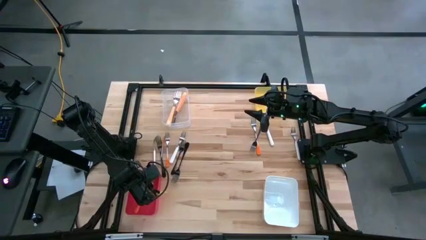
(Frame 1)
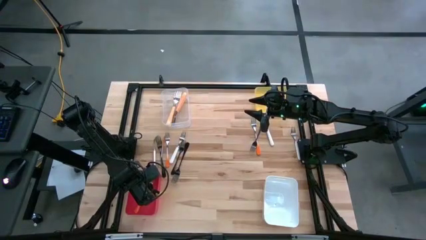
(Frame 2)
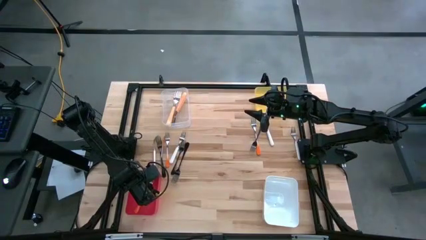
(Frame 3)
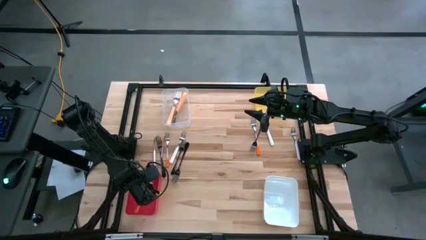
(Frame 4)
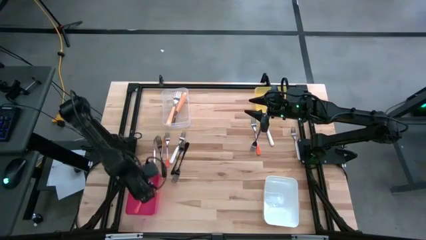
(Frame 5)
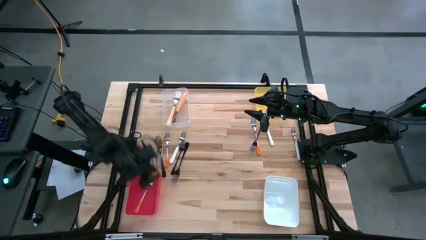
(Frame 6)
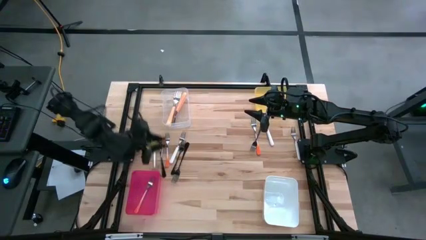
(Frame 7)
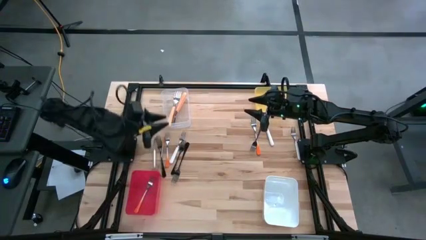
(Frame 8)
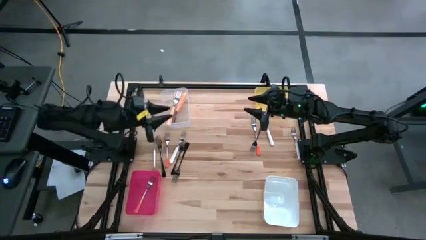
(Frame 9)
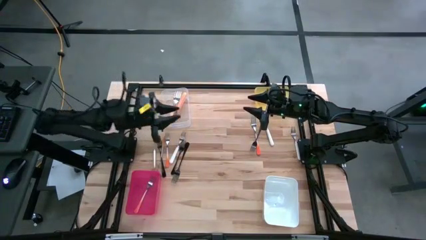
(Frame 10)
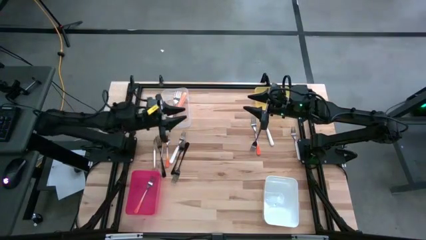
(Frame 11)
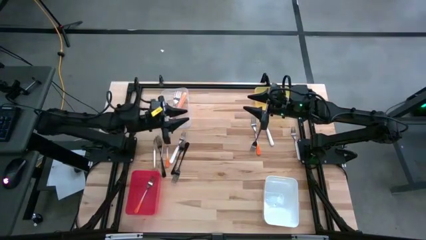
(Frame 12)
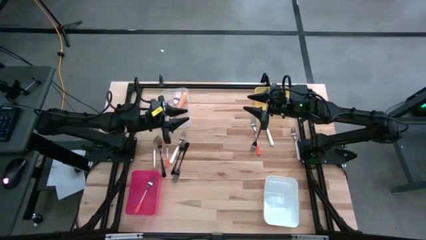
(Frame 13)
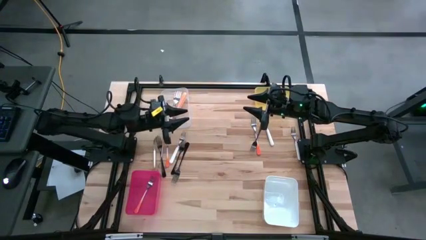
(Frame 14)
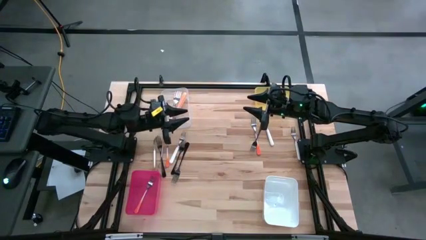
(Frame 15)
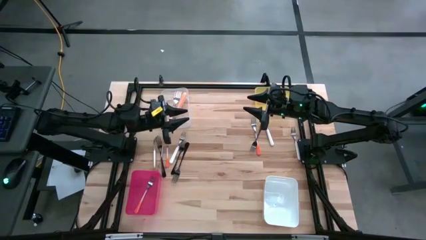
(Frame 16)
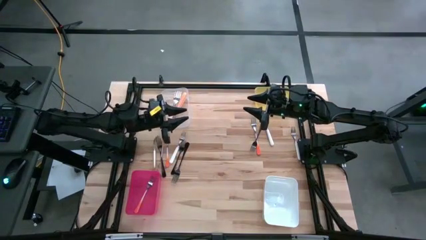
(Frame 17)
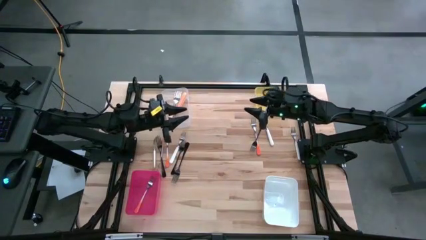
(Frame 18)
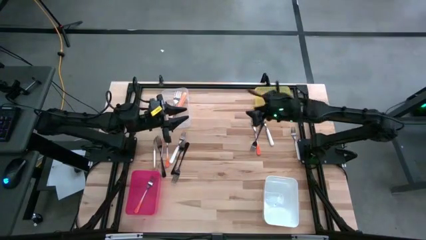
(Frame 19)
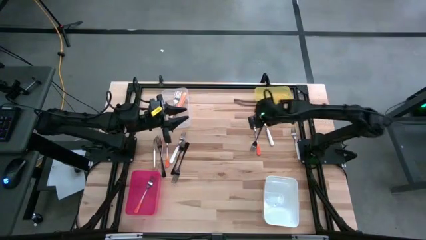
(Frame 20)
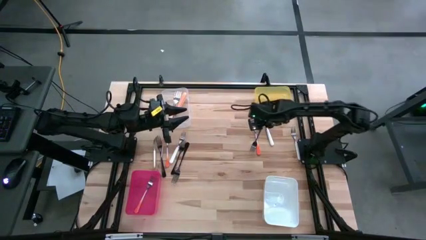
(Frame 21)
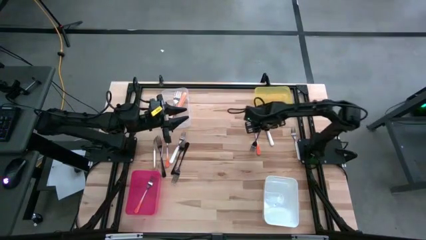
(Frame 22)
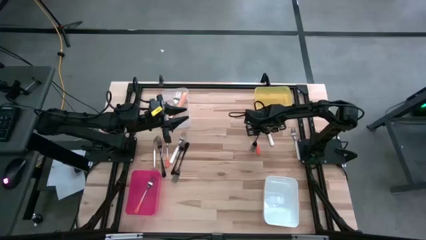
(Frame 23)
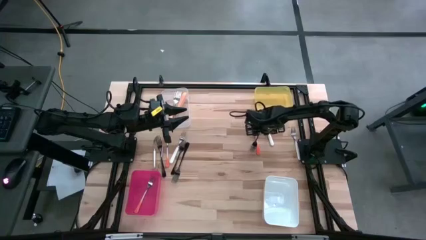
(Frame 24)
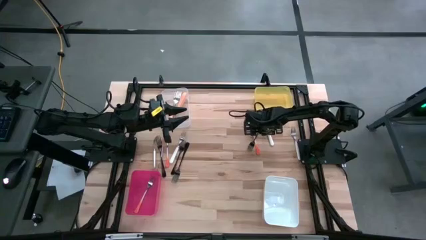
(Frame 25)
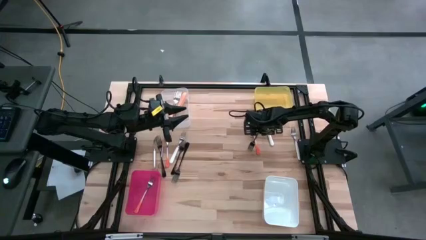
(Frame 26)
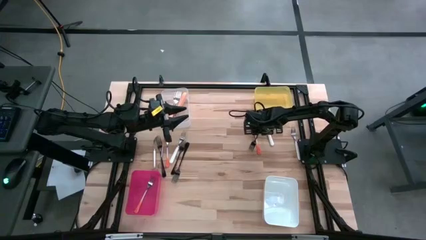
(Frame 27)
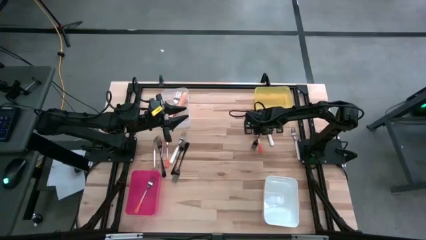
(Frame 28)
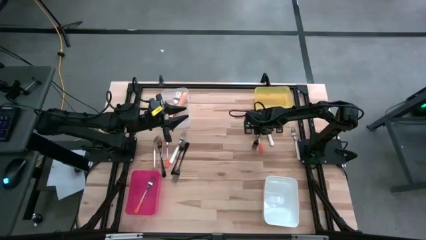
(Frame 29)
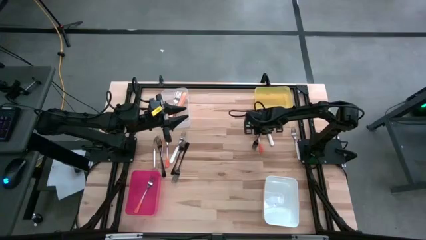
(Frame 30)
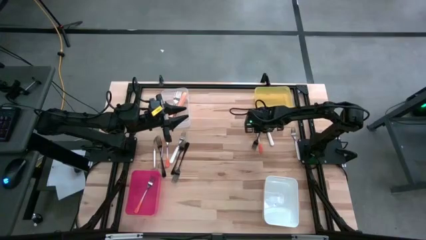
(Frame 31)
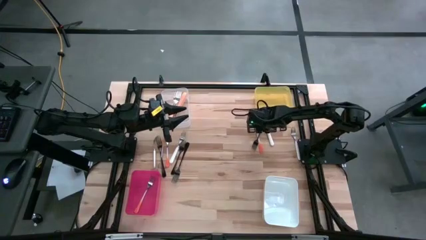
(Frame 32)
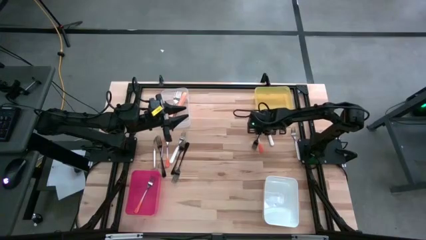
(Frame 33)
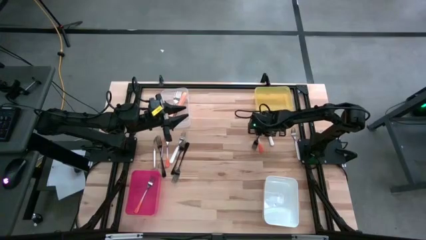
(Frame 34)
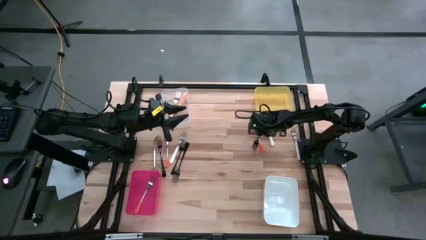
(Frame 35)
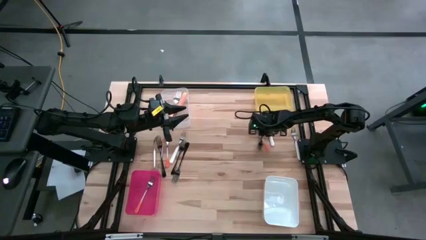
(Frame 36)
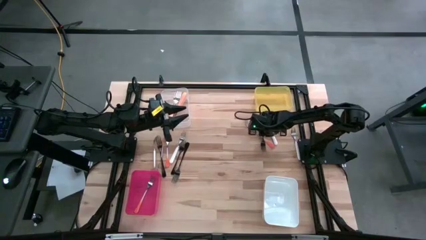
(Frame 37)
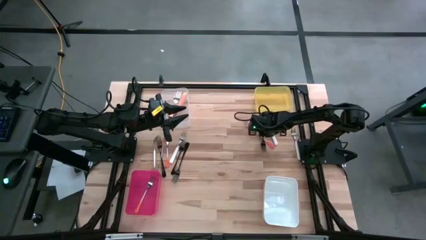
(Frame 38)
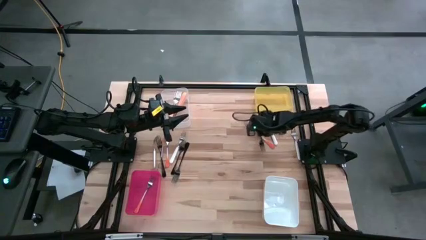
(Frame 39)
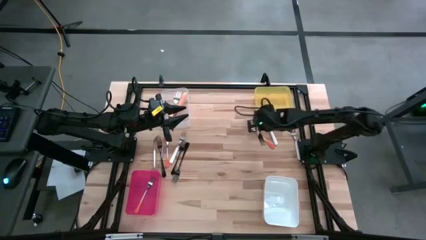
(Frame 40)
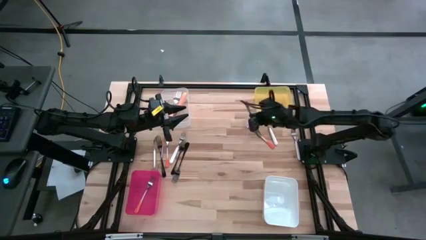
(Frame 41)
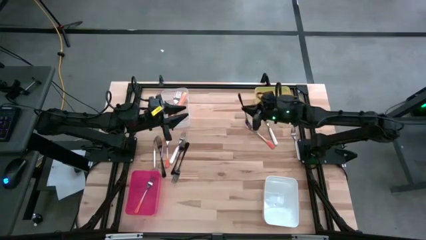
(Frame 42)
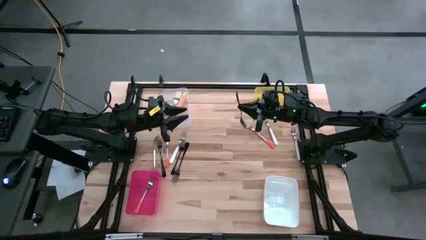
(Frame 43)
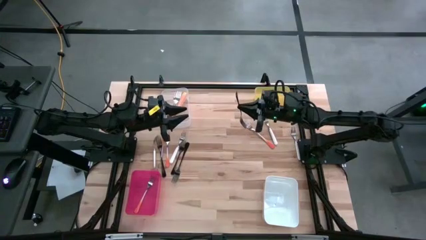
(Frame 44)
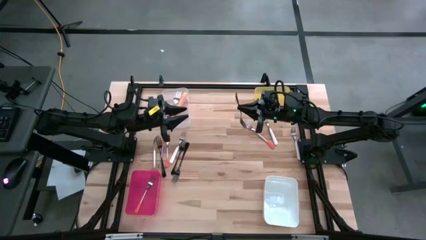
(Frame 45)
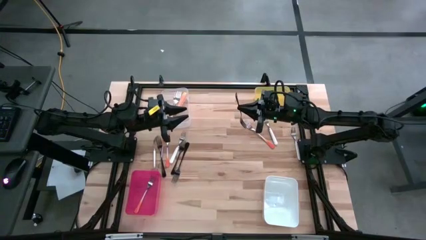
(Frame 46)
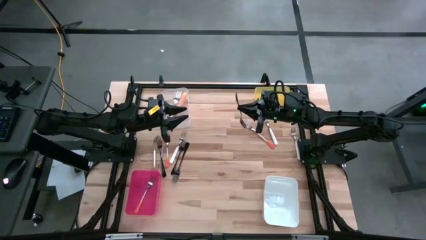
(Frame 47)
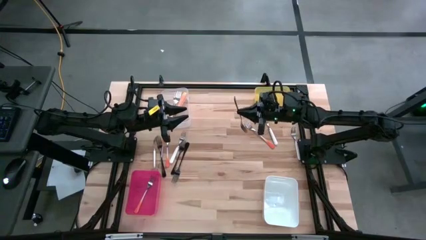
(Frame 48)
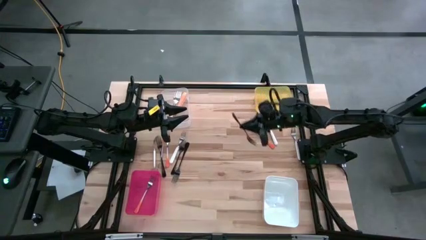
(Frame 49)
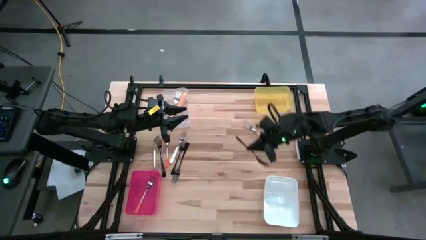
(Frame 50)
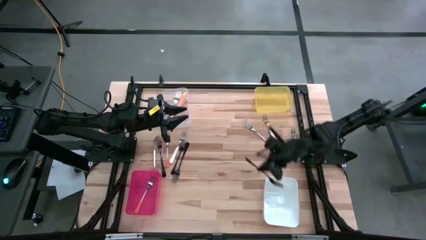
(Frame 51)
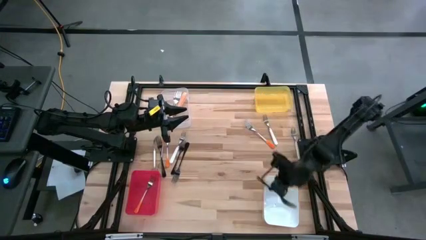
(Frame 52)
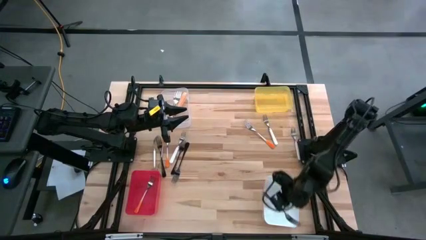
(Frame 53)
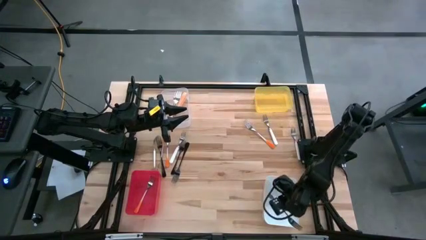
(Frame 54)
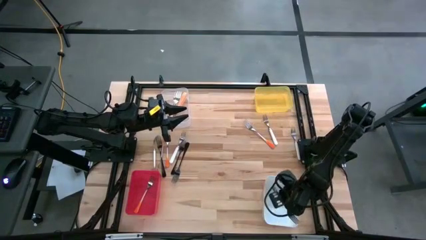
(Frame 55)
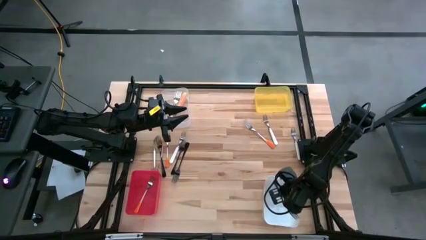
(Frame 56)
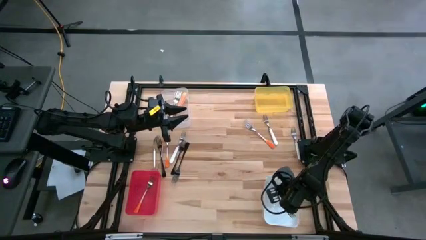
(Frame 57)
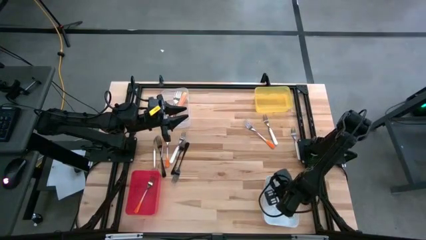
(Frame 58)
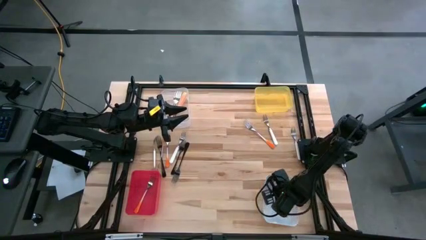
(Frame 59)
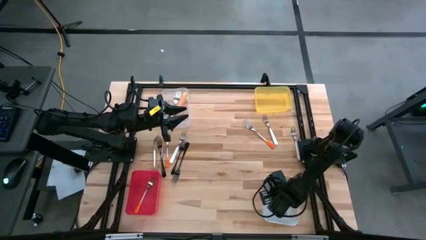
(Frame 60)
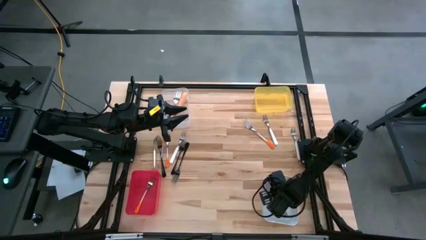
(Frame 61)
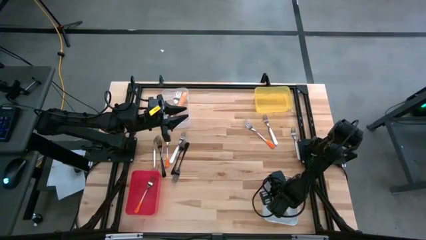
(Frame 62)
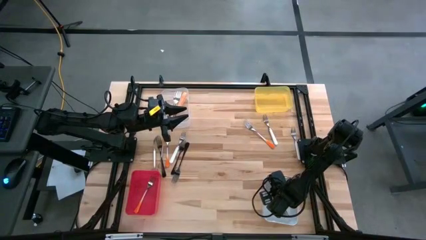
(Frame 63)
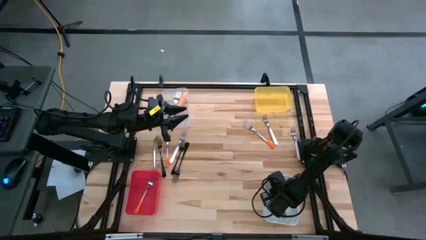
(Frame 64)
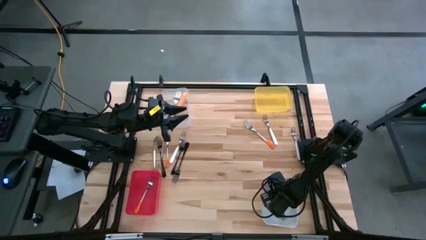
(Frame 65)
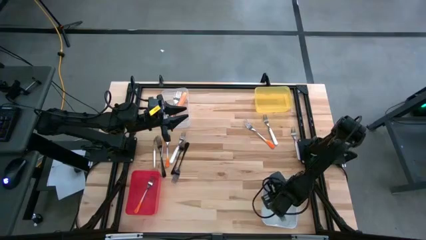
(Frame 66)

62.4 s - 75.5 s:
Task: Sort silverware by color (type)
Put the black fork into the white bin
